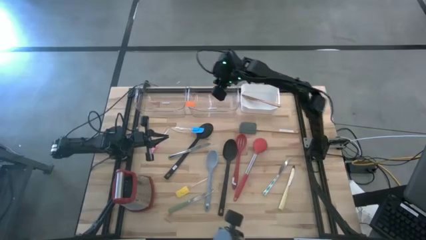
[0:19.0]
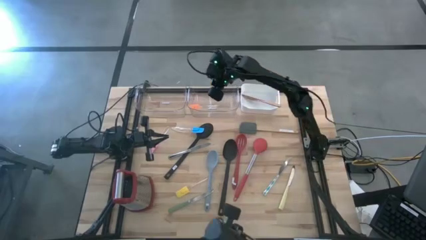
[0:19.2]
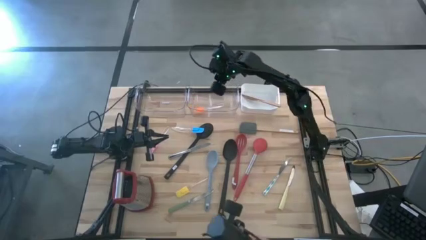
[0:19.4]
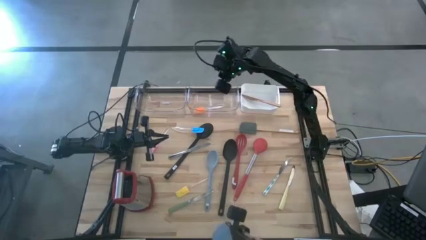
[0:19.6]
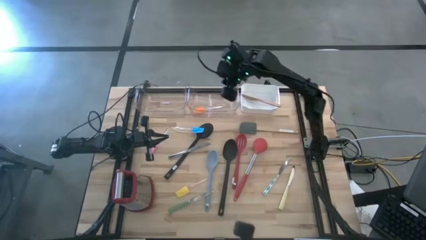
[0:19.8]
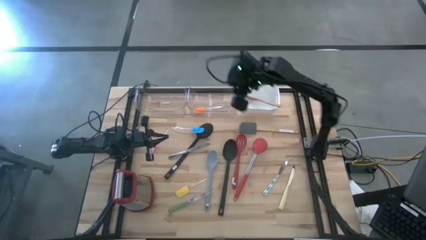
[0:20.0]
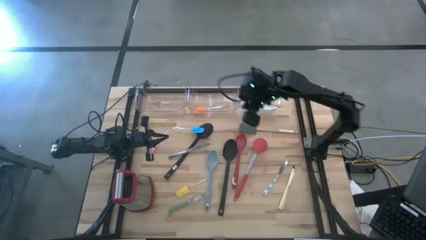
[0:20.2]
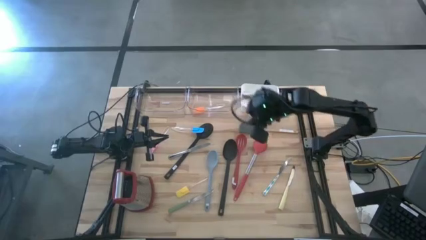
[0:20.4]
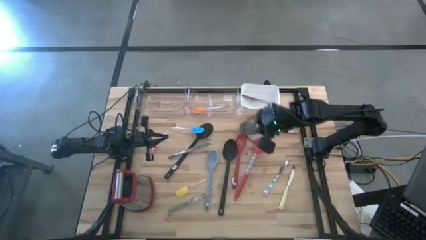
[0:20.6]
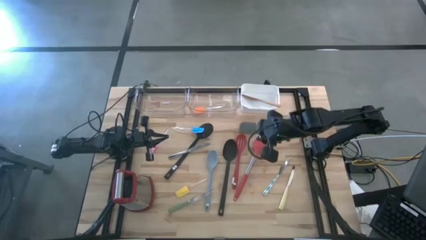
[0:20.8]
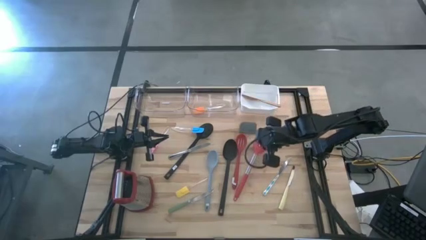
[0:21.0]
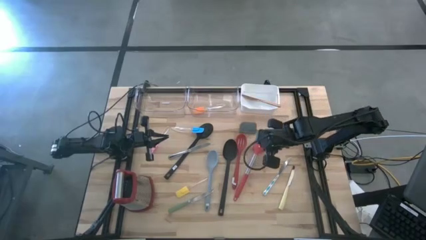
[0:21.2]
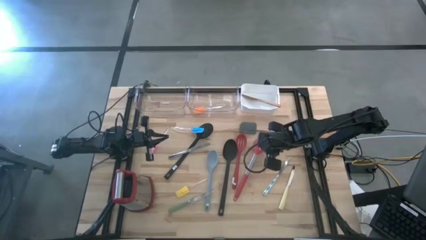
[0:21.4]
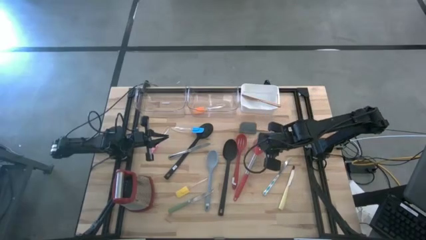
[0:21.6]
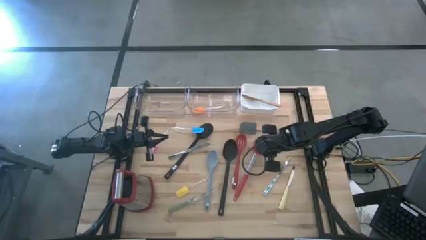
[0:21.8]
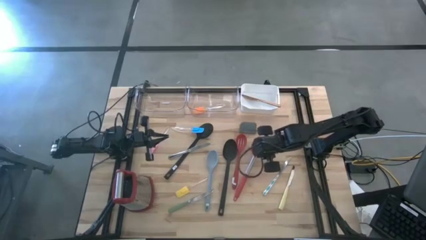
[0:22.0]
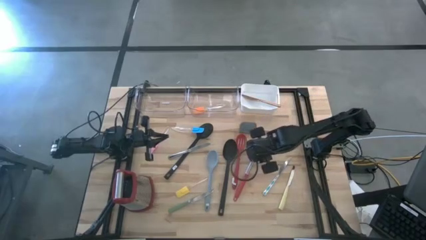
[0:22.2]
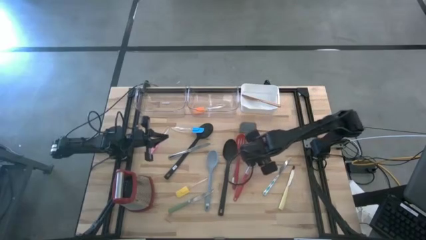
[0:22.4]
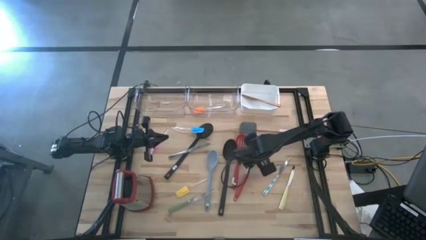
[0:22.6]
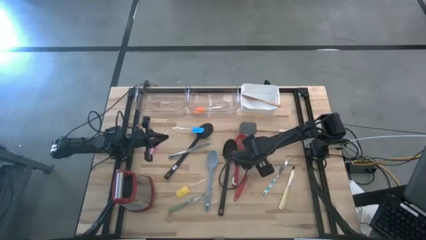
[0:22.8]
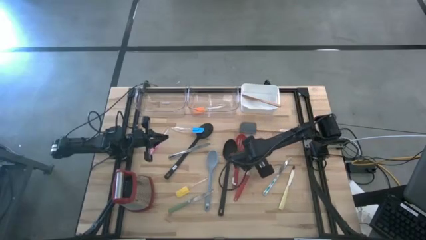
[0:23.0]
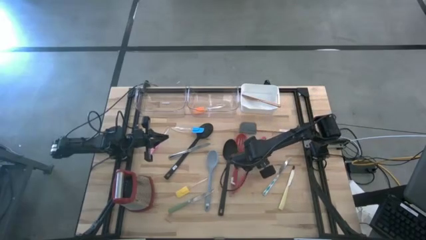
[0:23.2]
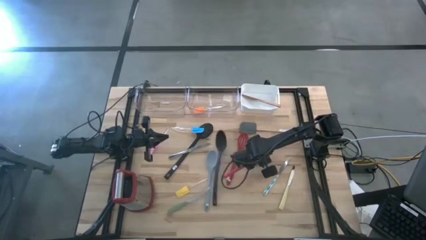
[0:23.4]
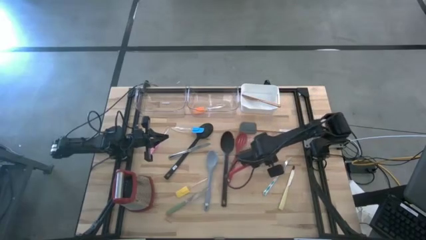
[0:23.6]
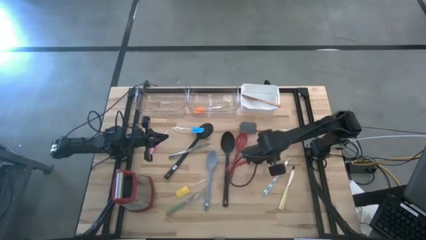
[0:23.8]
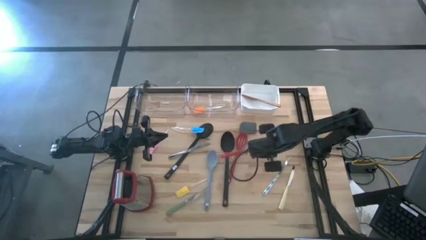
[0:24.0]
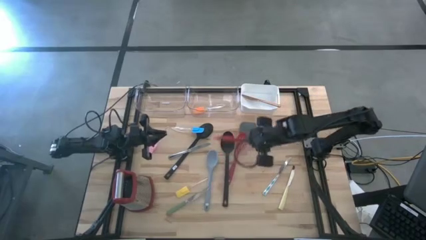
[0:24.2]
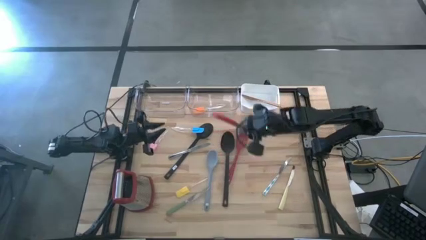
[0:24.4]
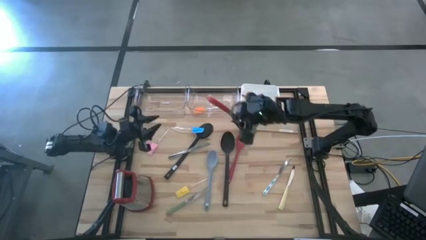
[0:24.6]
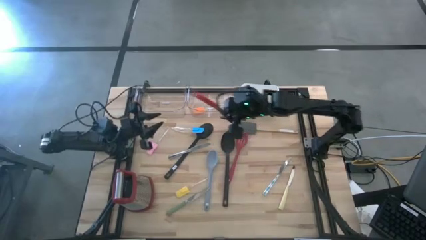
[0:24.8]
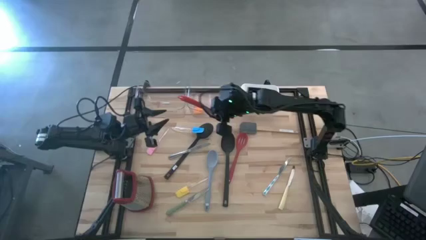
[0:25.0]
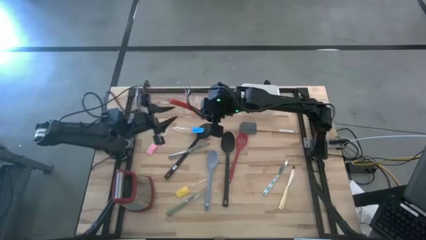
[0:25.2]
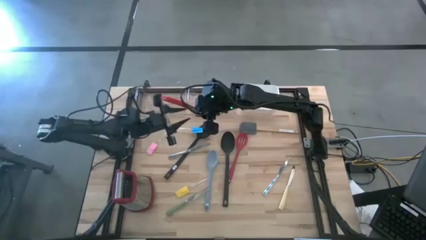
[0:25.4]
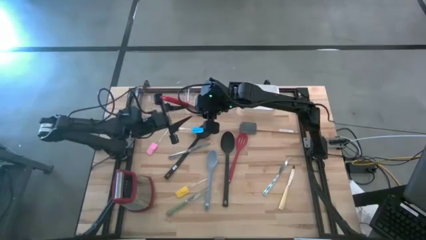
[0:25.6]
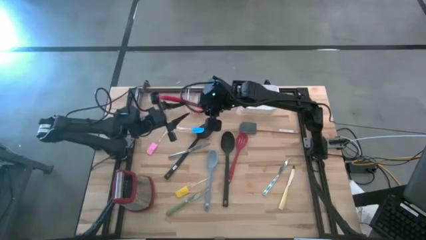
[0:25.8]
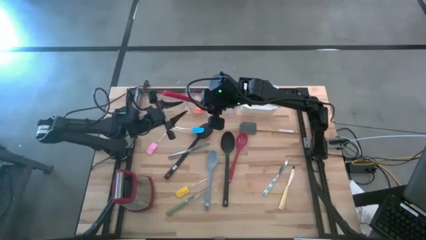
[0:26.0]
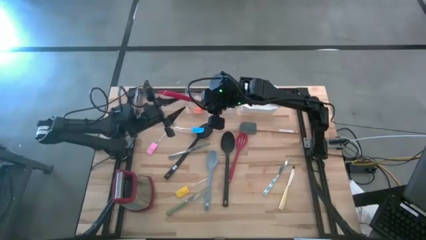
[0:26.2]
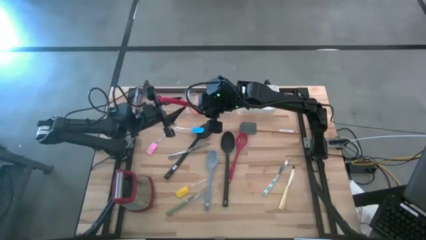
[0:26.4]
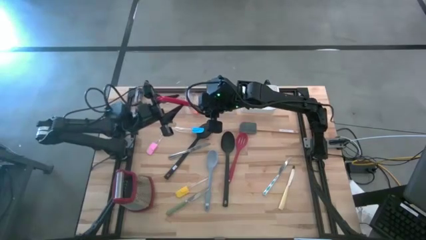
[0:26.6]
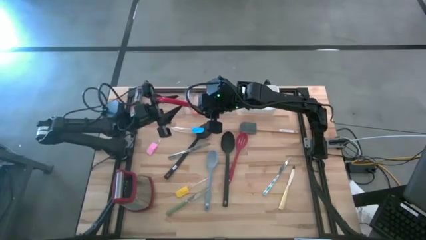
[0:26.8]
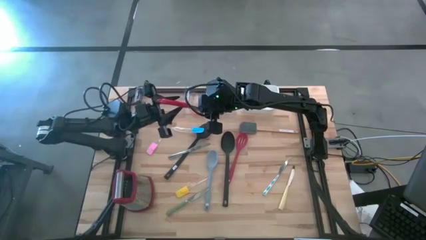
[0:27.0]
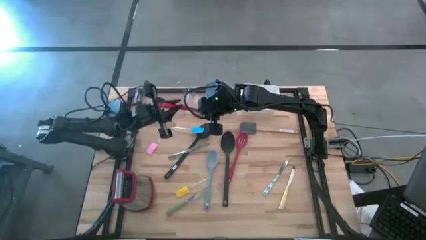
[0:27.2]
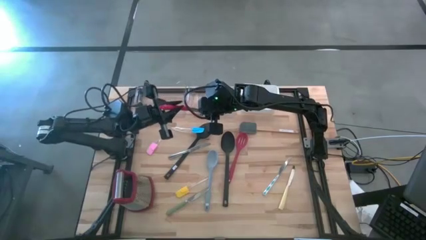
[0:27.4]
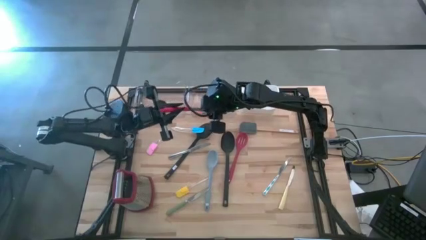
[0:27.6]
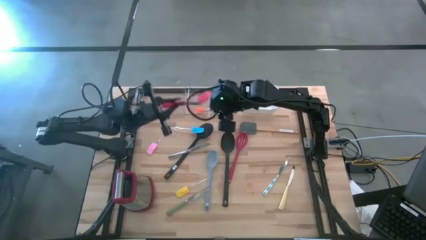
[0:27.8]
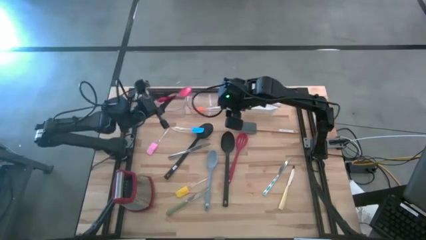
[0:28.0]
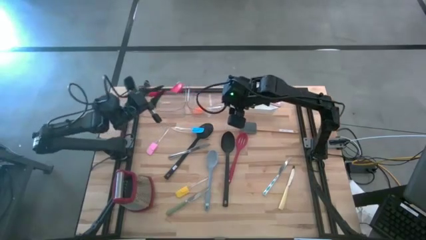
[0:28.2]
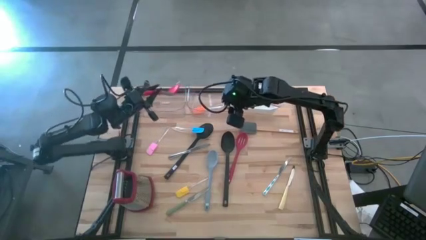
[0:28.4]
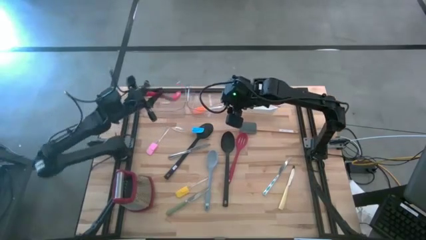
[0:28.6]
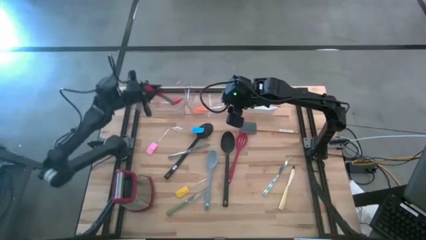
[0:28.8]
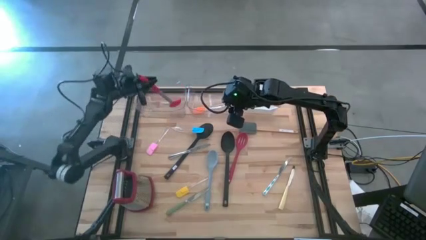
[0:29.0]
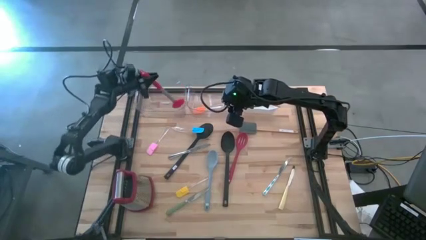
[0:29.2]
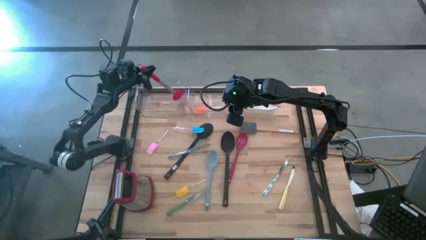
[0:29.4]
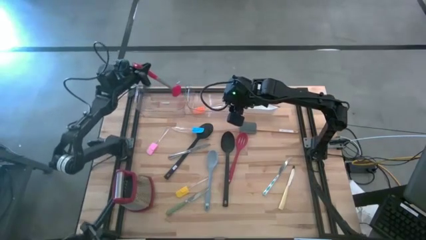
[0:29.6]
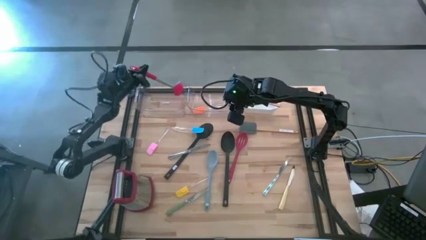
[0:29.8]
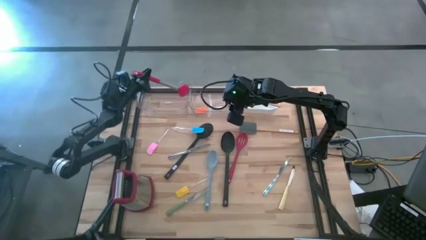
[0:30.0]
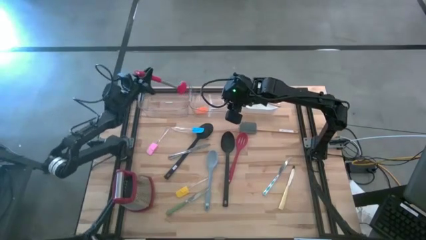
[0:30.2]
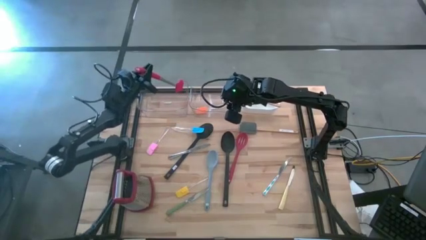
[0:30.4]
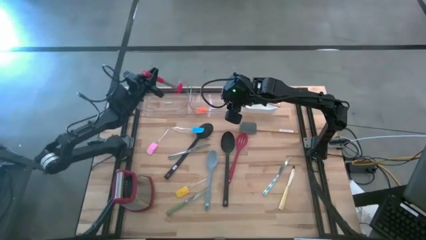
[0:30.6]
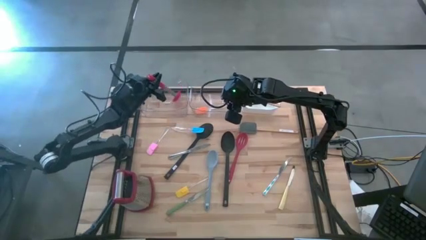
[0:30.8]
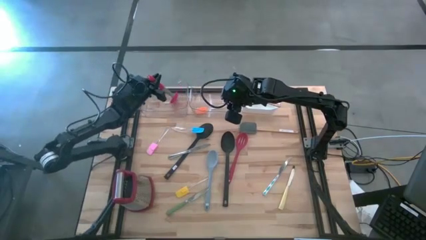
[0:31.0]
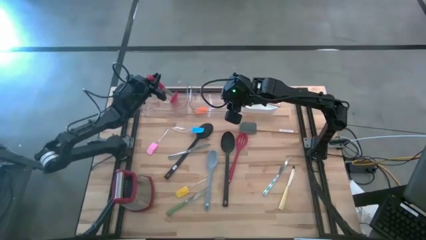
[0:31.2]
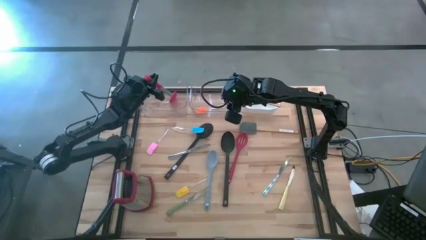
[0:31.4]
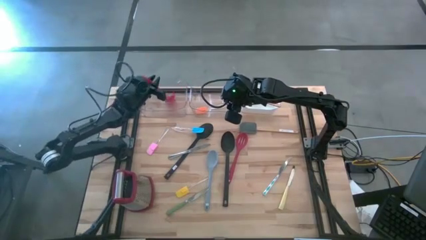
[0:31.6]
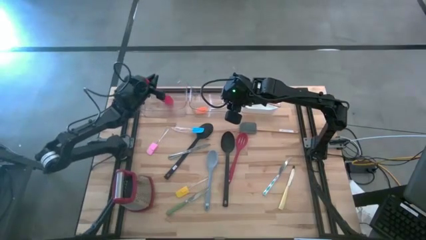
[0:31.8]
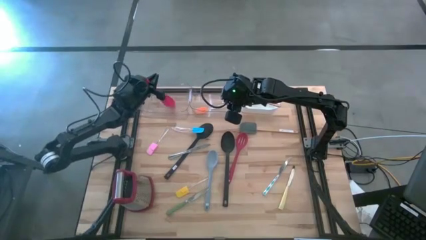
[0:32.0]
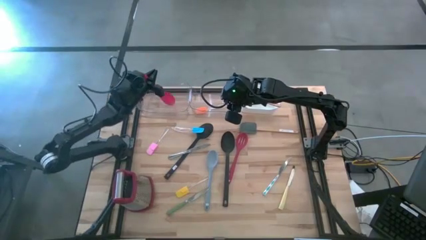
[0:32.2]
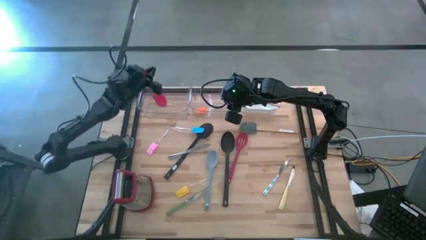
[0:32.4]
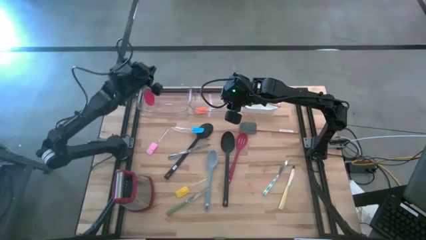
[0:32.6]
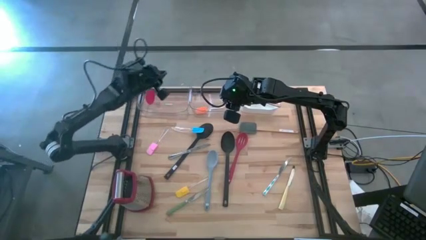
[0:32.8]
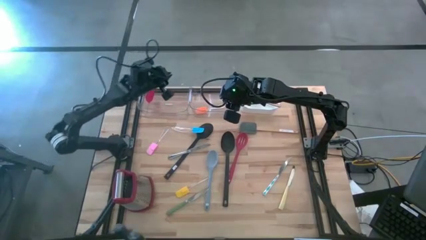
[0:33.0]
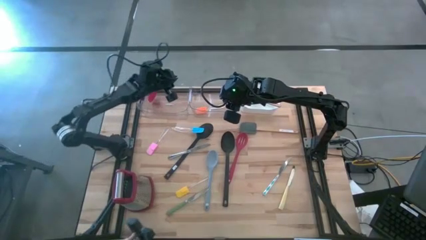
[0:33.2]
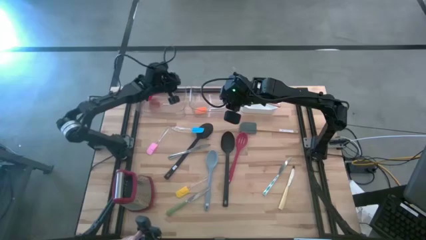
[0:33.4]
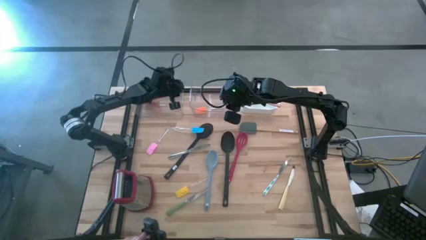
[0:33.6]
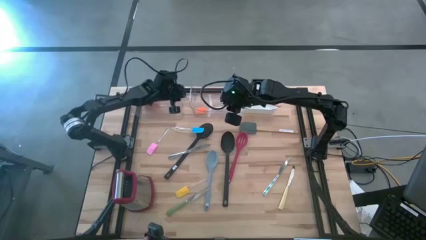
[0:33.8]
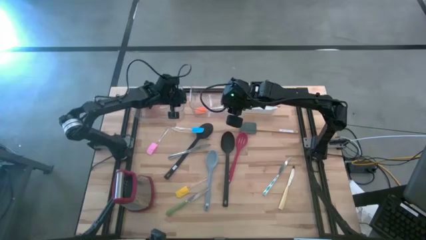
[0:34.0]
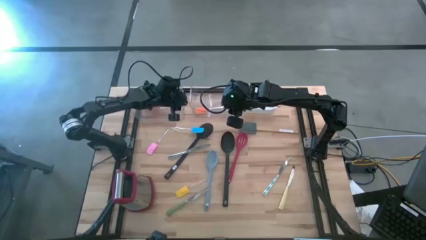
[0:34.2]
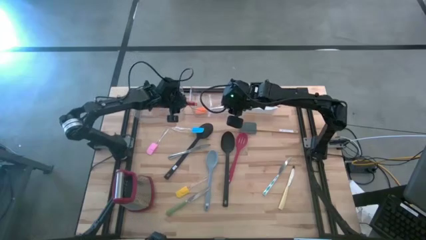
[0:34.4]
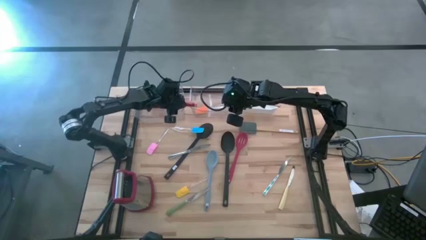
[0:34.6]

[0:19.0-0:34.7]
Task: Pick & Place Kitchen Items
Put the right red serving spoon into the left transparent bin

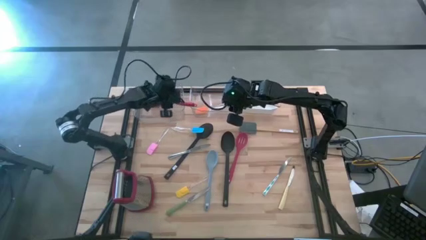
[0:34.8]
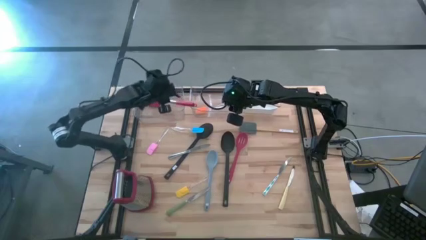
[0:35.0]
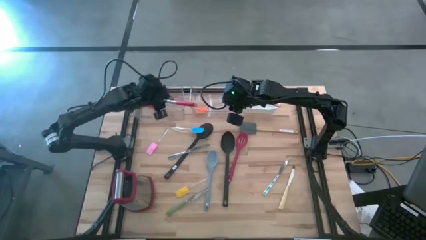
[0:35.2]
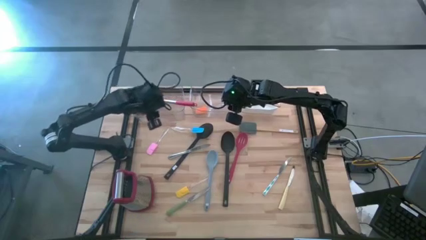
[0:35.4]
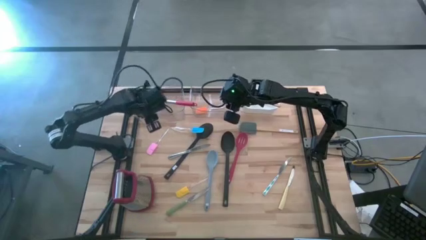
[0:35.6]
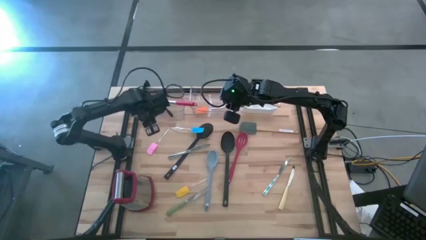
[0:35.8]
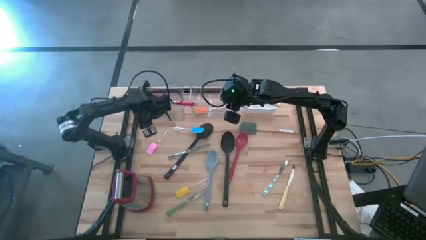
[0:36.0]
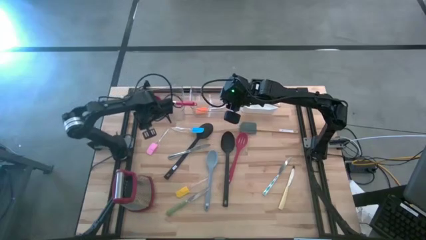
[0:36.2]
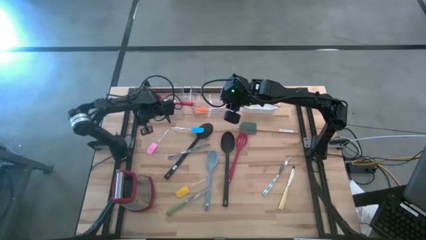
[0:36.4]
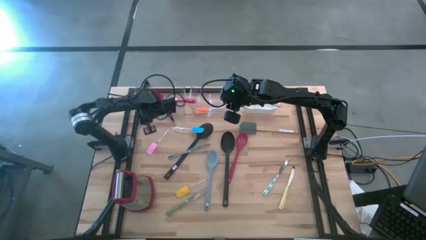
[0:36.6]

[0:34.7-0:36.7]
Adjust the left transparent bin on the table
